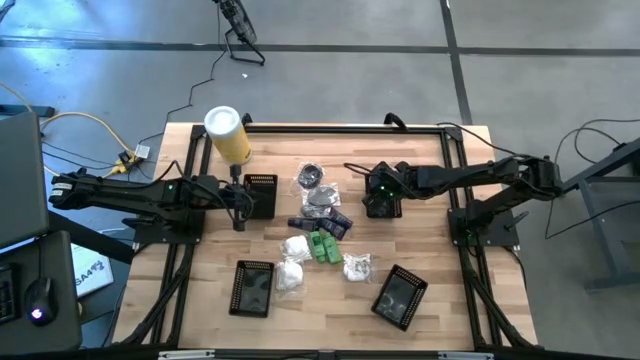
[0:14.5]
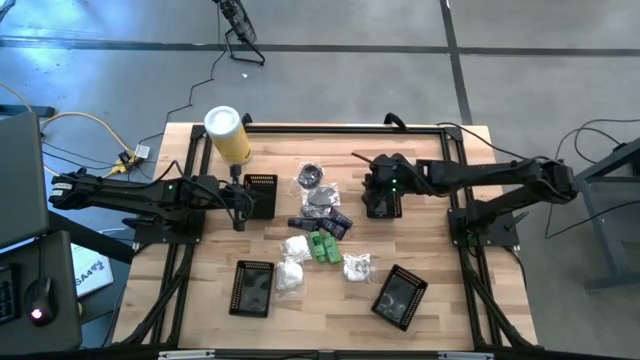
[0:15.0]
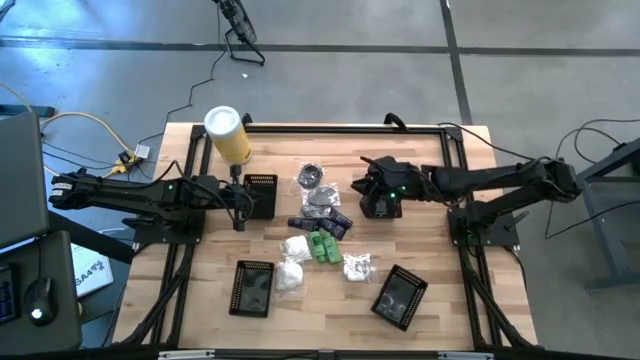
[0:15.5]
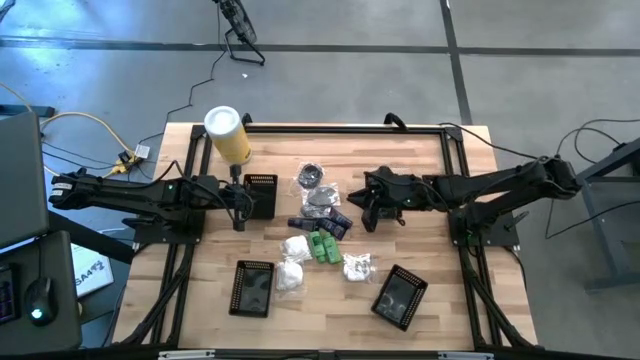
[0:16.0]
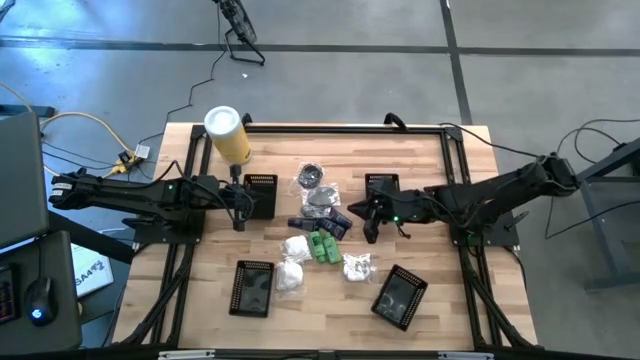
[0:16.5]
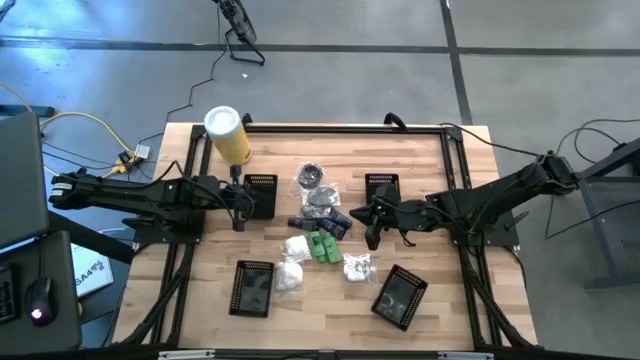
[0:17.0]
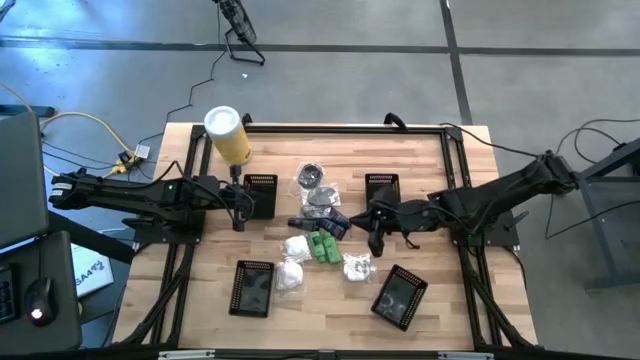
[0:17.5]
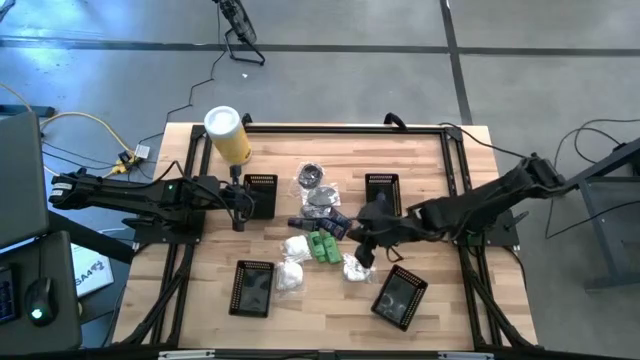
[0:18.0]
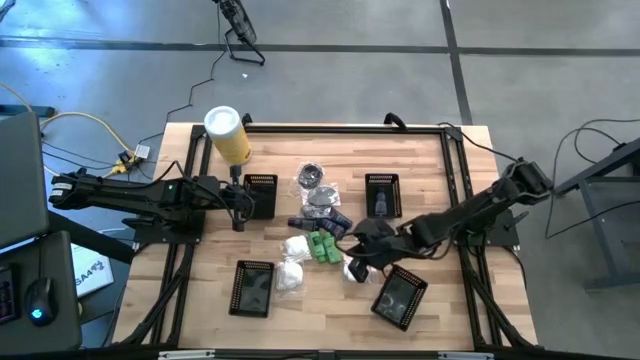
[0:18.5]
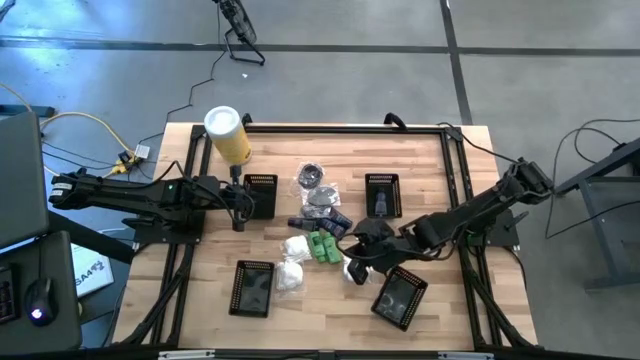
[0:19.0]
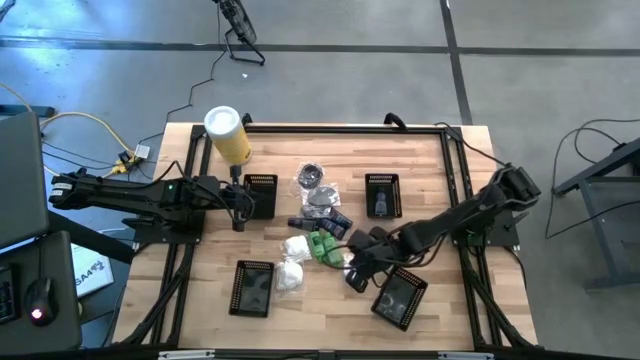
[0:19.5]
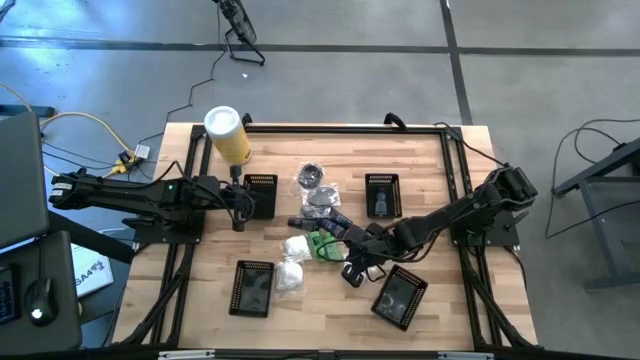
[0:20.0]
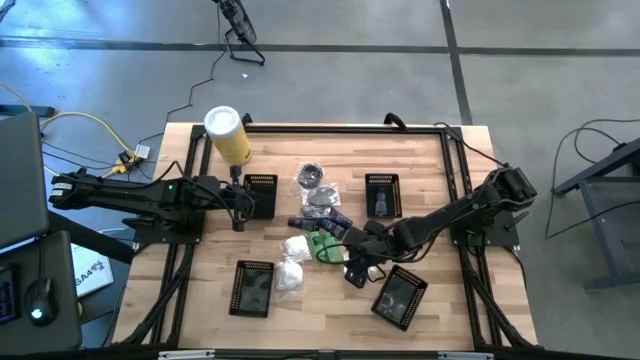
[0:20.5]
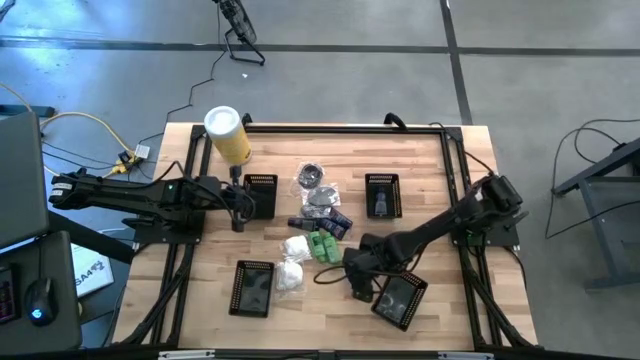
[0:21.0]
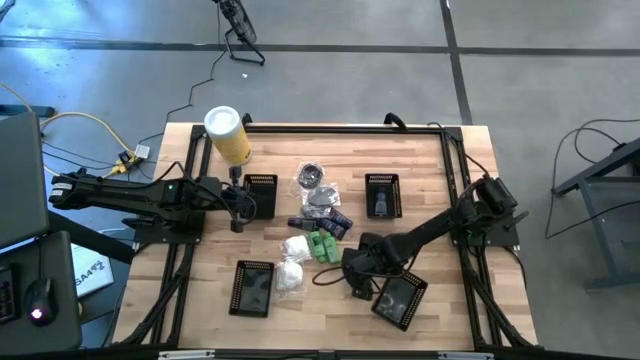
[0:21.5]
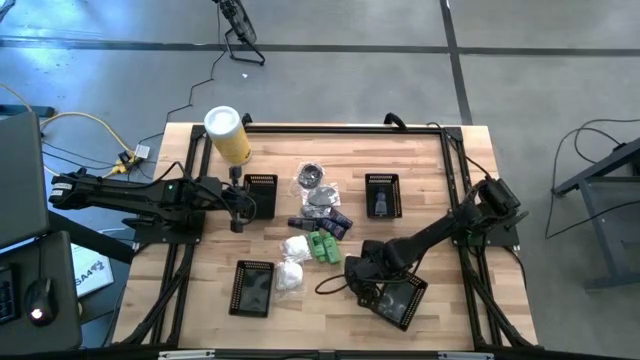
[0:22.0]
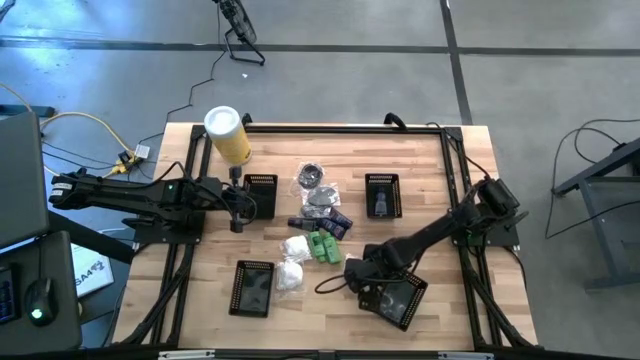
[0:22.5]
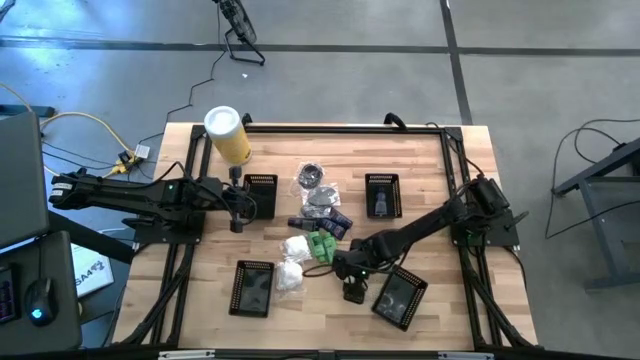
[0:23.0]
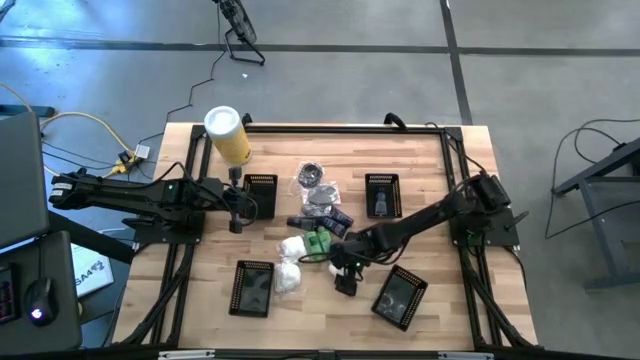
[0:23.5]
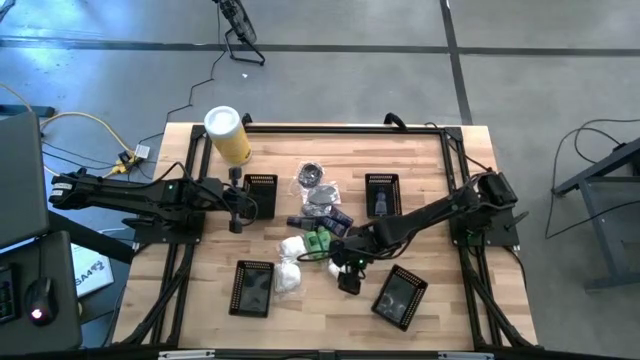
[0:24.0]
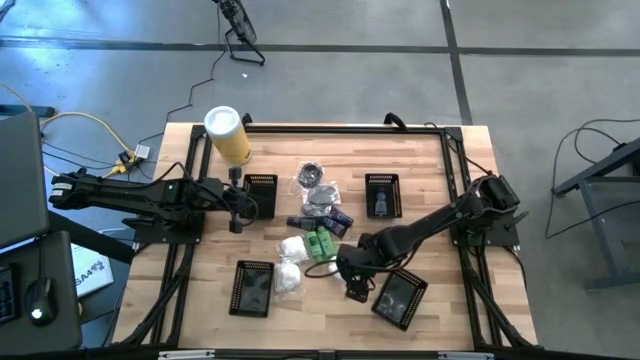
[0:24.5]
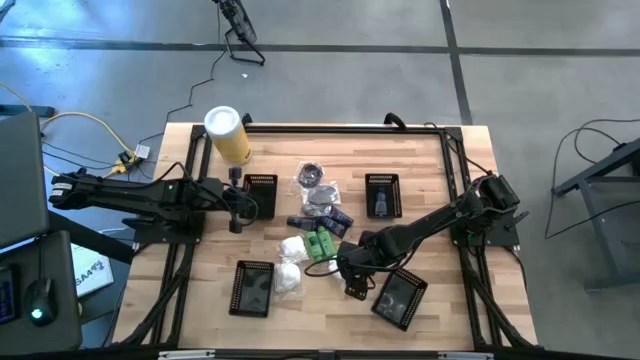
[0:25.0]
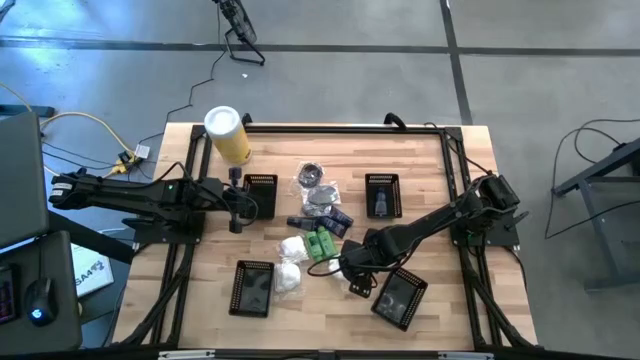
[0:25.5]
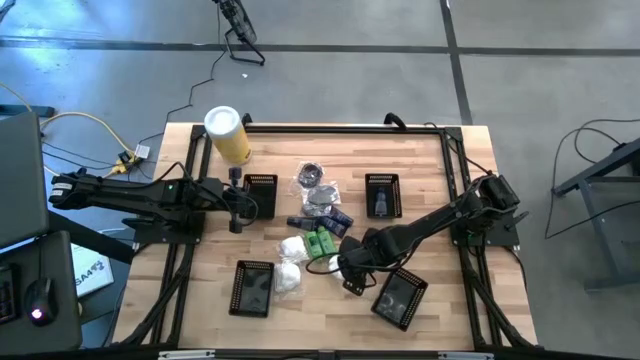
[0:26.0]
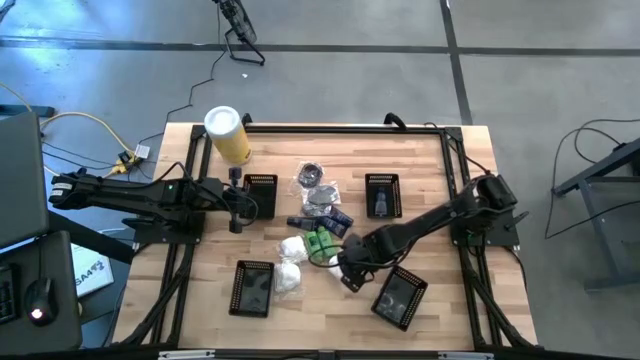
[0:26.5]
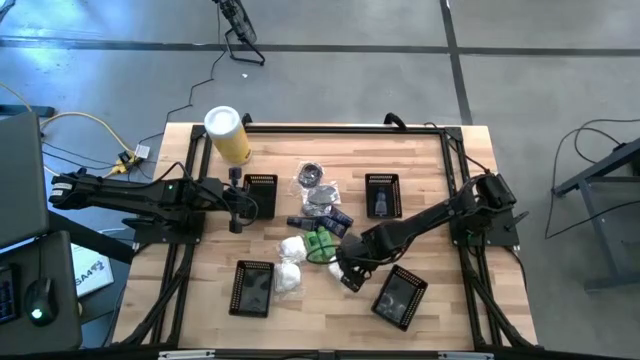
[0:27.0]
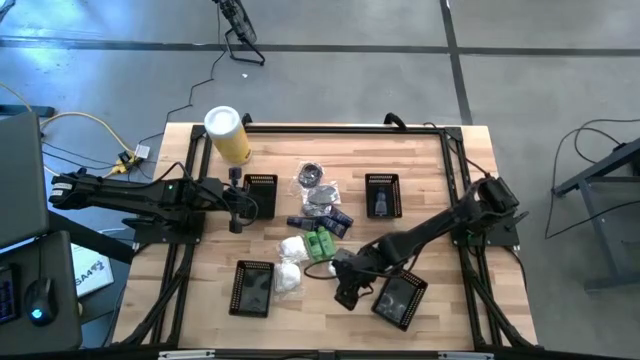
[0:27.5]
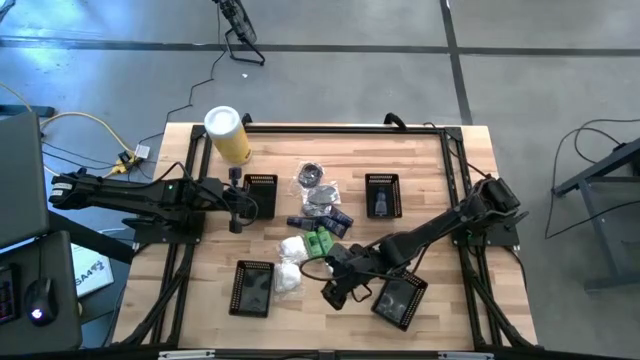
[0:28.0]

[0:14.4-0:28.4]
Task: Pick & Place Travel size toiletries
Put the white cotton pack into the bottom right black basket

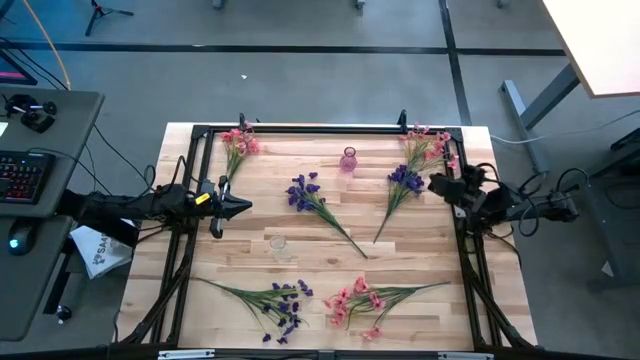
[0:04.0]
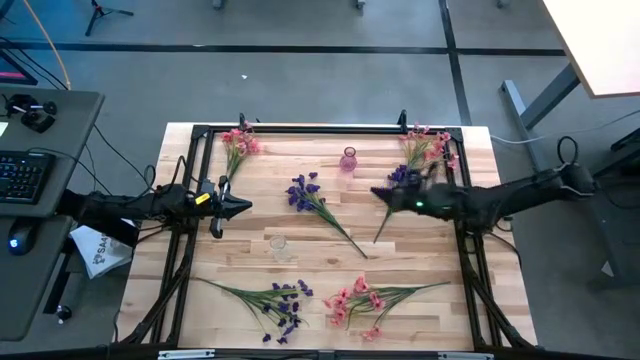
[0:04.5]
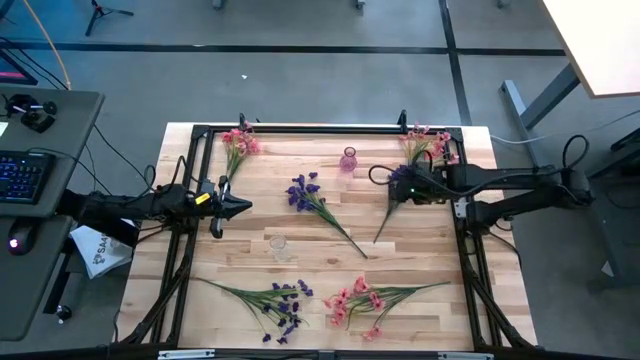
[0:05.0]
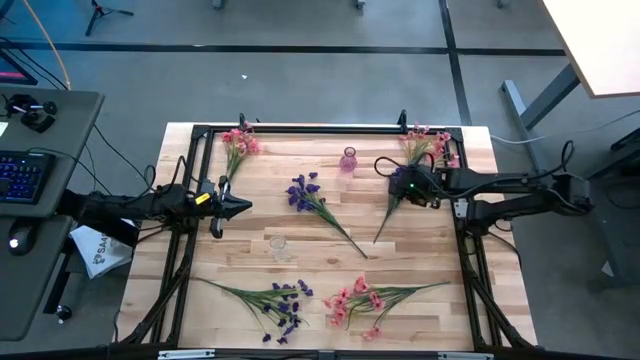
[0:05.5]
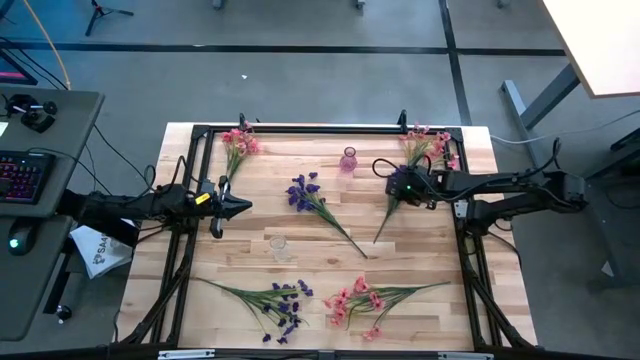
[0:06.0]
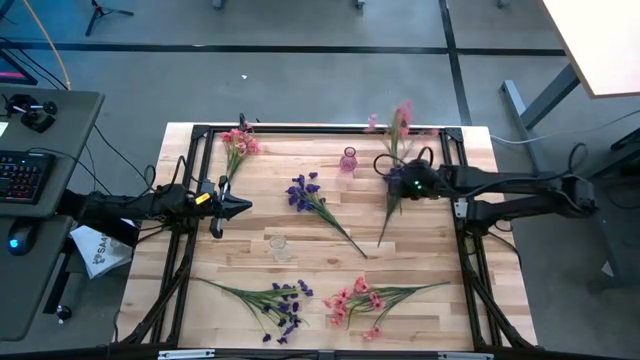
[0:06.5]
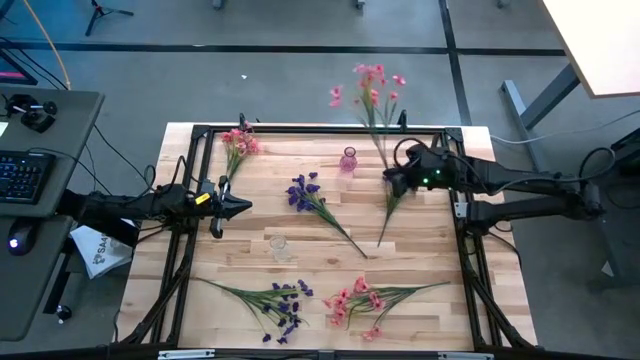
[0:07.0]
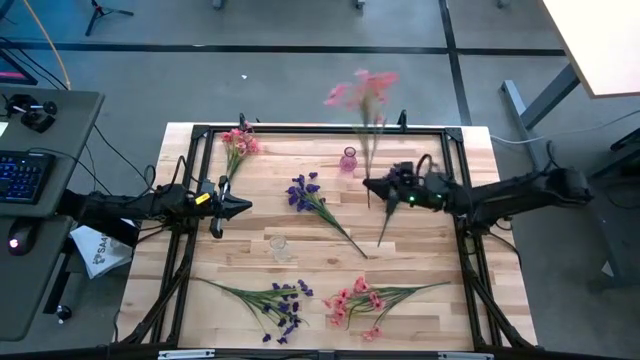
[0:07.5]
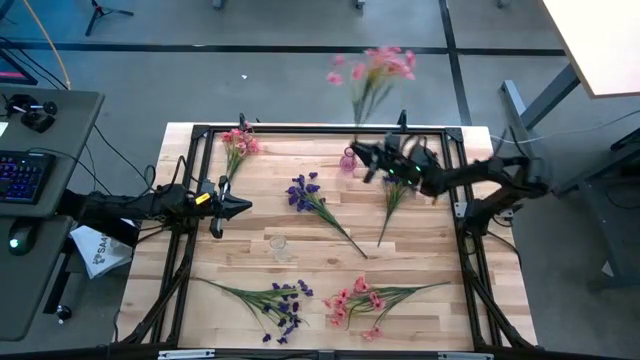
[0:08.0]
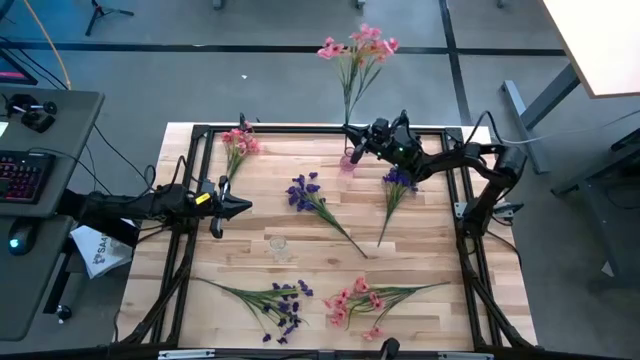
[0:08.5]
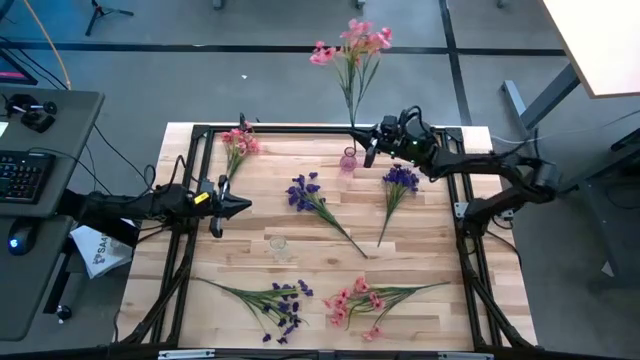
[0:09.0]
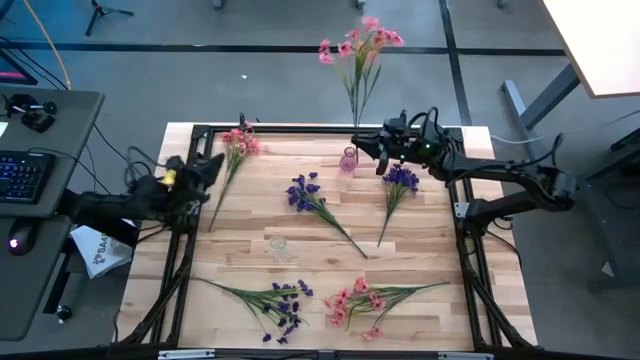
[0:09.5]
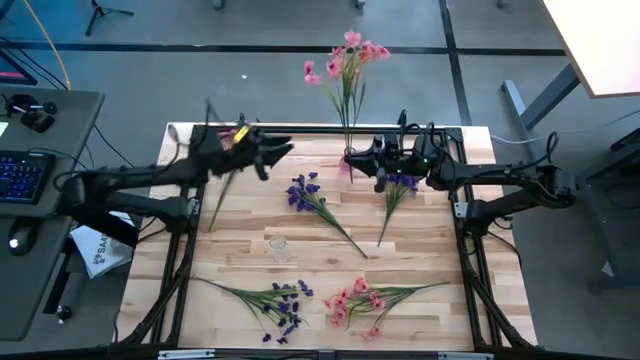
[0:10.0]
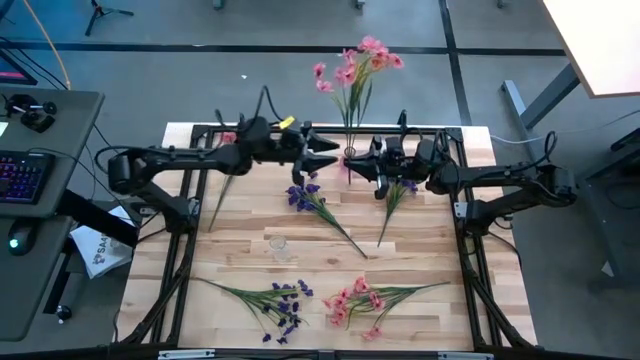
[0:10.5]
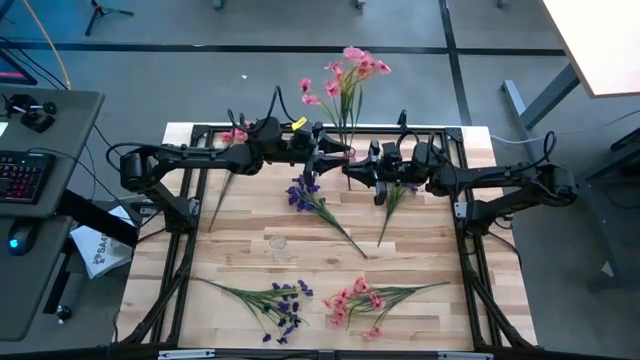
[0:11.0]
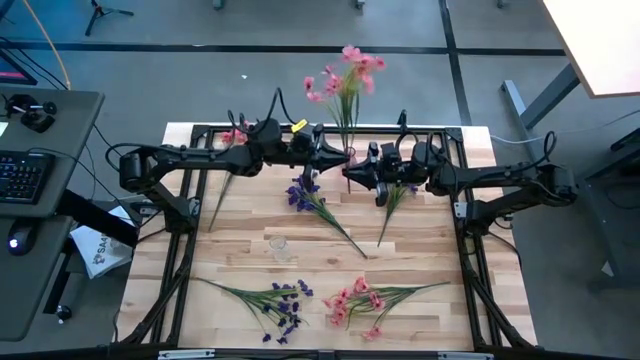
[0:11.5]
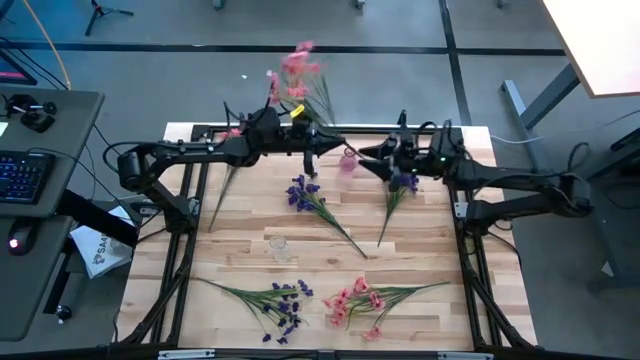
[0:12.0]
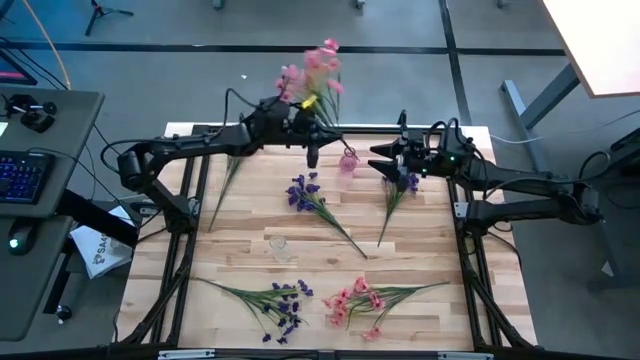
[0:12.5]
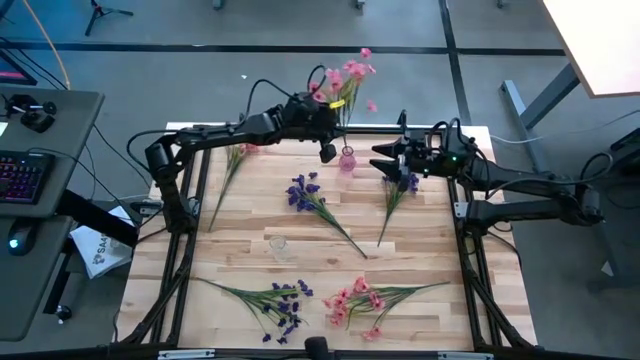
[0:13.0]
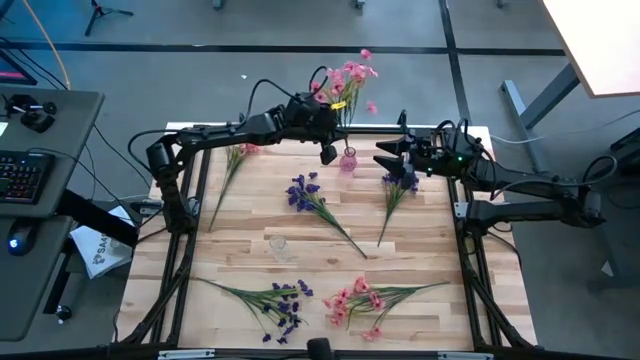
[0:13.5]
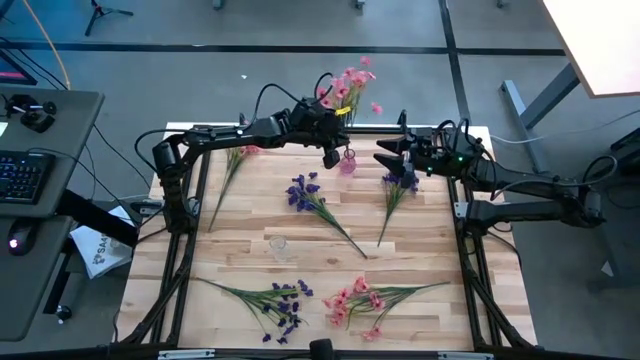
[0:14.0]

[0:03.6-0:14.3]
Task: Sort flowers into vase by color
Put the right pink flowers into the pink vase
